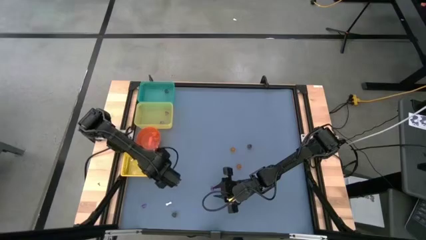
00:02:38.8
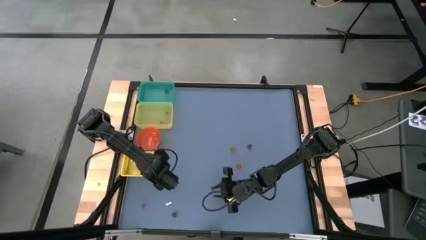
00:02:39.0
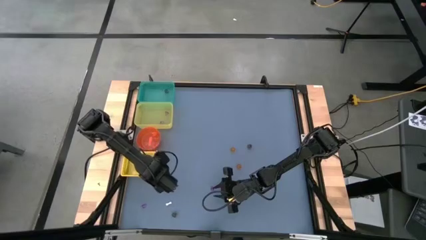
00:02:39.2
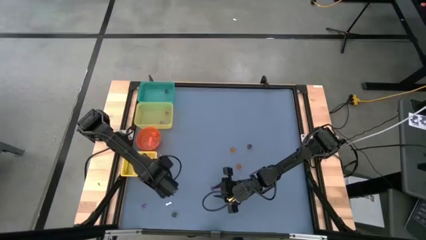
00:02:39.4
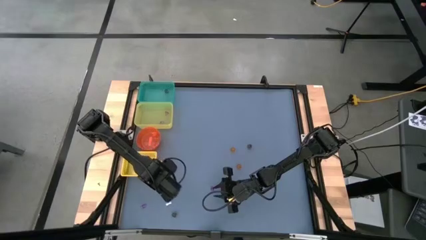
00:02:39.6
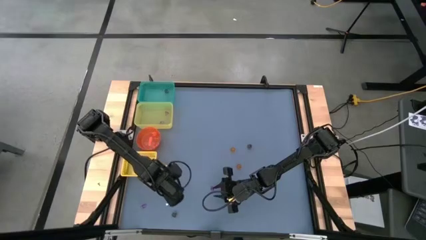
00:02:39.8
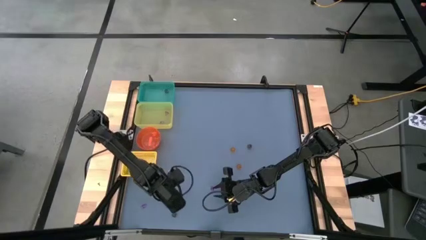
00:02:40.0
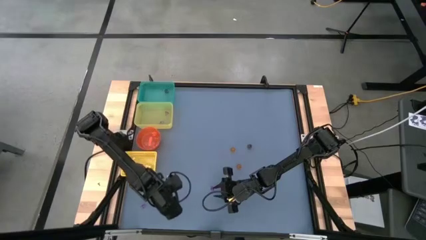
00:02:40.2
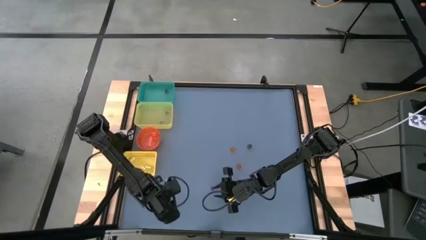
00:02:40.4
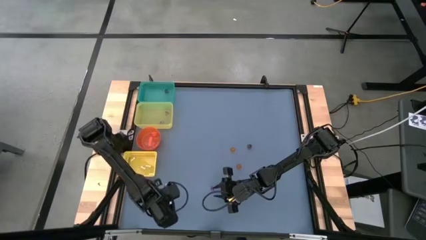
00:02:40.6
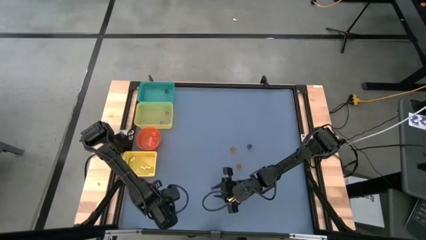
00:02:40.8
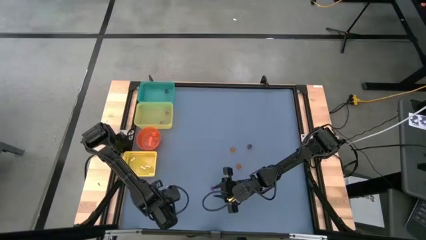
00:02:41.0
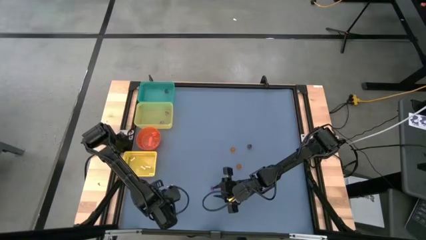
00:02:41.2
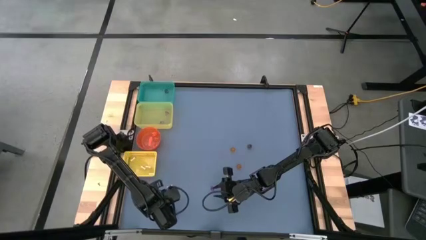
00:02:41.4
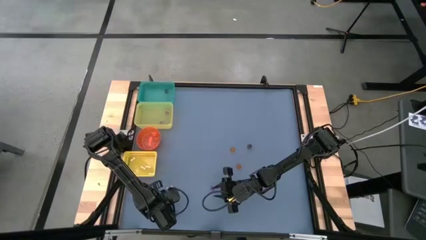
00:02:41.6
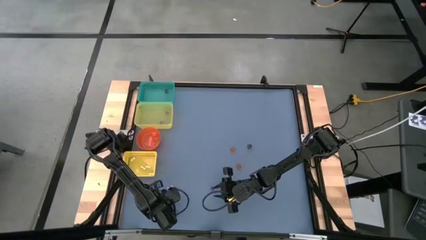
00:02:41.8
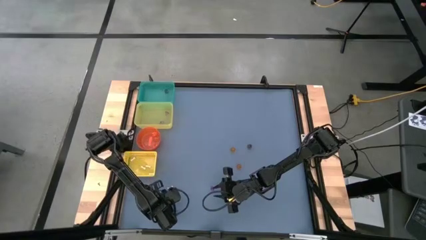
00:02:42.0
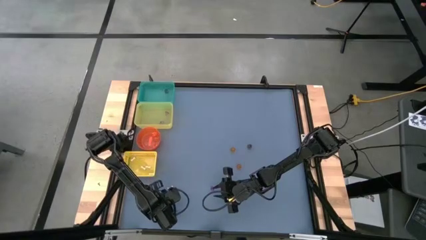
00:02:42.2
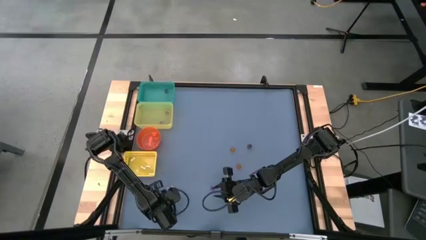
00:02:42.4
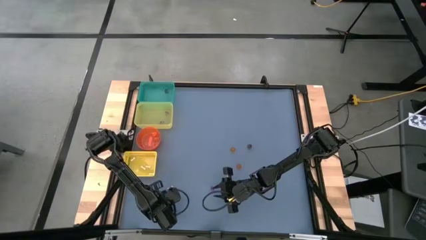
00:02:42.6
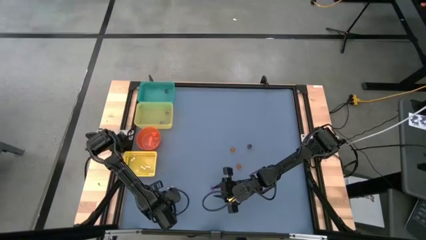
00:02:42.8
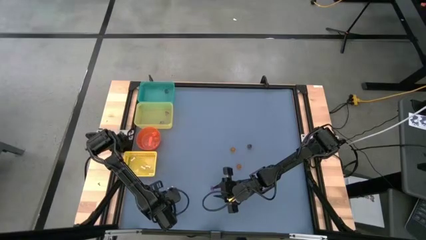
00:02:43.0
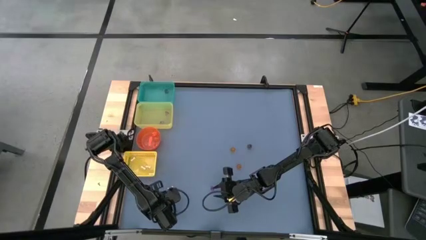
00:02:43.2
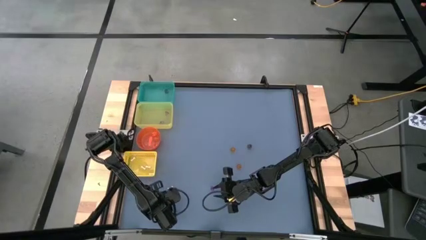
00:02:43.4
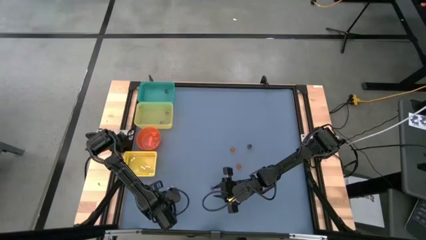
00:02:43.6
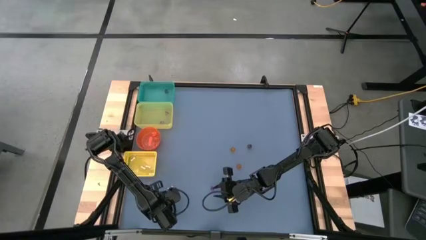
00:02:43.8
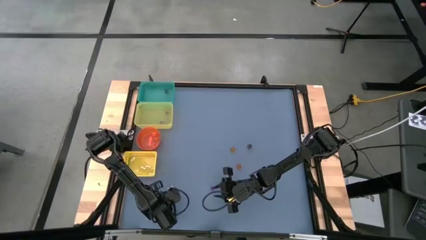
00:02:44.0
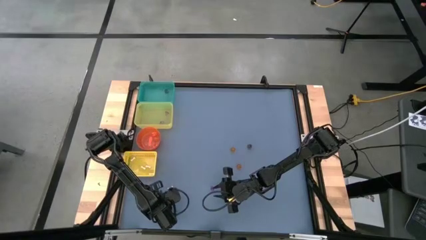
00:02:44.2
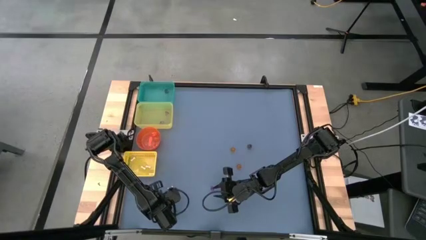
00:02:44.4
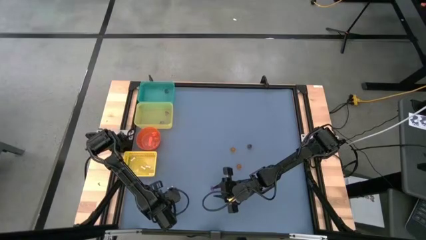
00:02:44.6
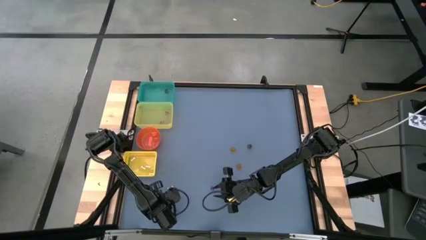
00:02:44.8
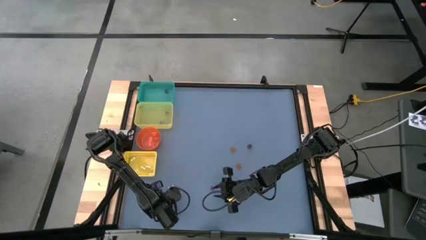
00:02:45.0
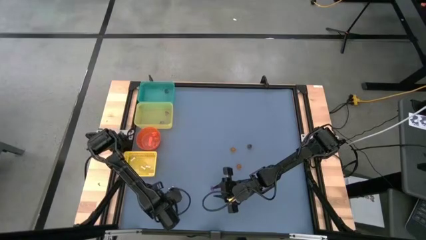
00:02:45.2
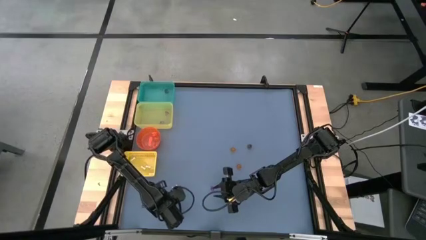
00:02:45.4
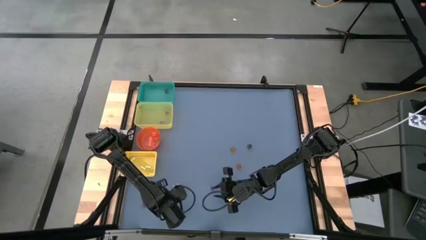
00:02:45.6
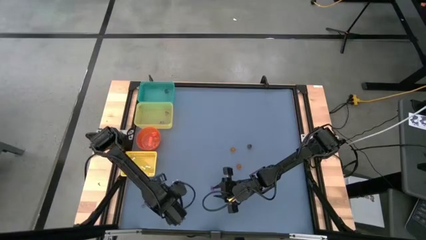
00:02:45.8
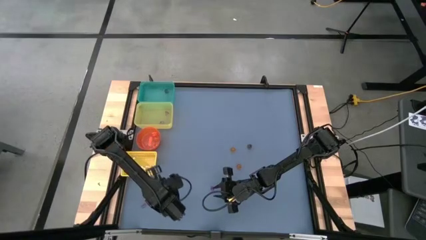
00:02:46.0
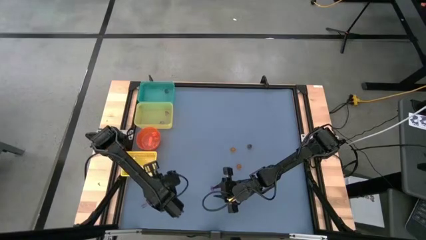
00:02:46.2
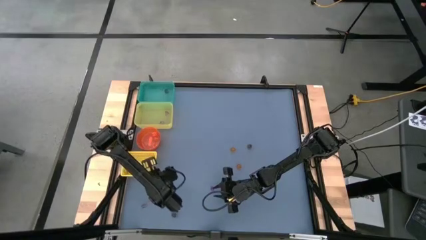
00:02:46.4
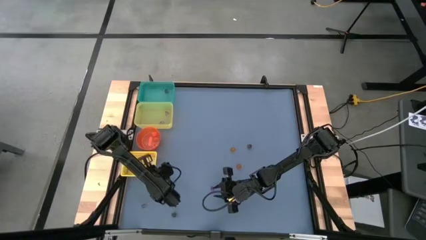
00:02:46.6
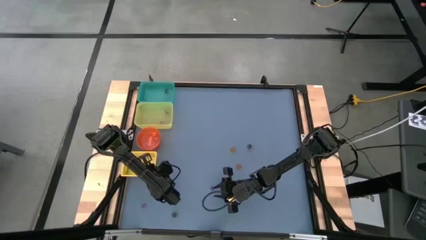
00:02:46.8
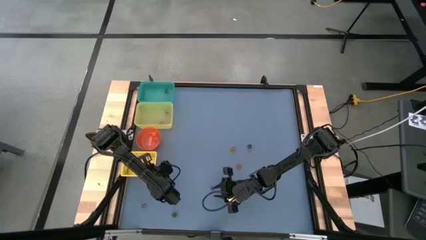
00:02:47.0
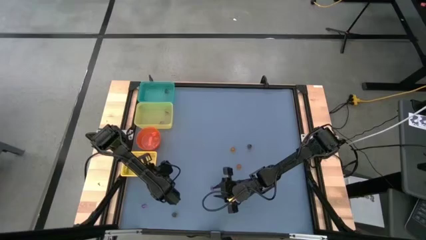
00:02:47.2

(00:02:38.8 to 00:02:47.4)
Task: Sort Halloween decoration
Put the white bone toy into the yellow basket

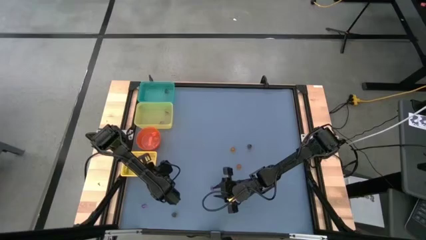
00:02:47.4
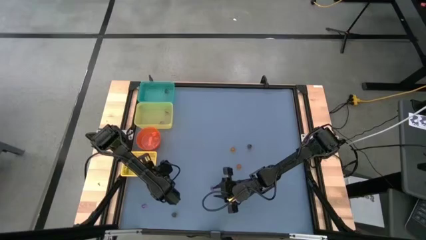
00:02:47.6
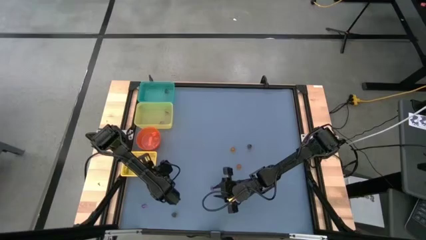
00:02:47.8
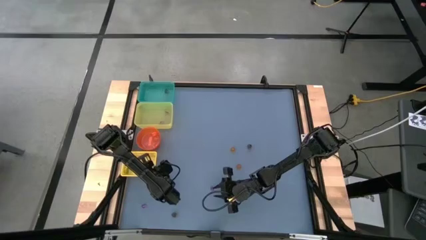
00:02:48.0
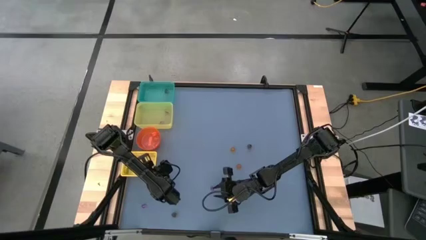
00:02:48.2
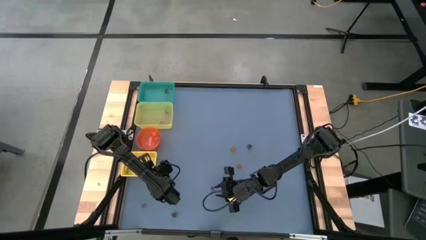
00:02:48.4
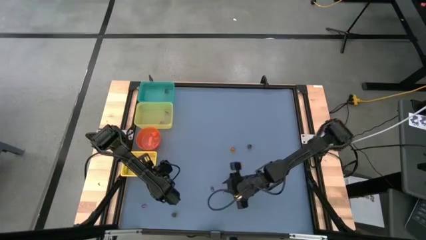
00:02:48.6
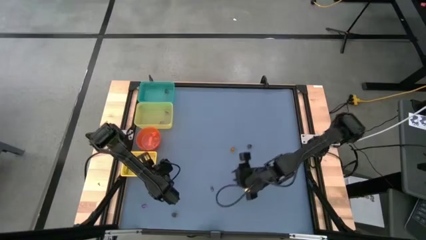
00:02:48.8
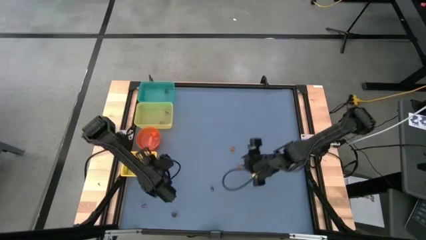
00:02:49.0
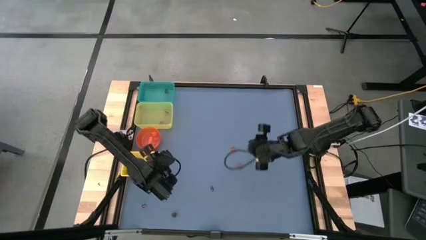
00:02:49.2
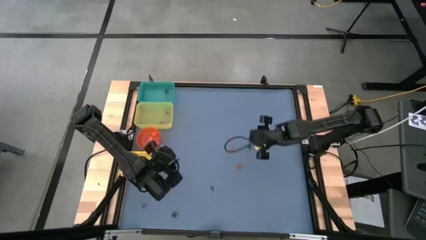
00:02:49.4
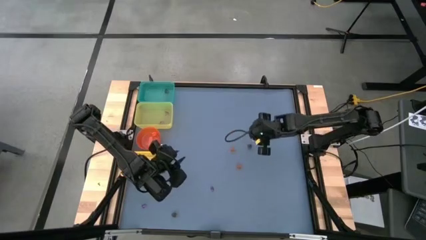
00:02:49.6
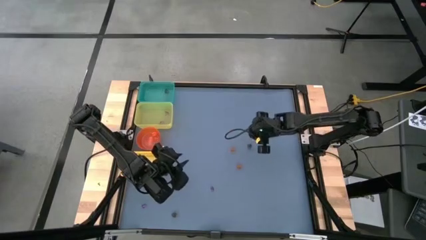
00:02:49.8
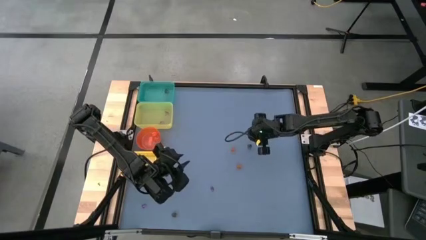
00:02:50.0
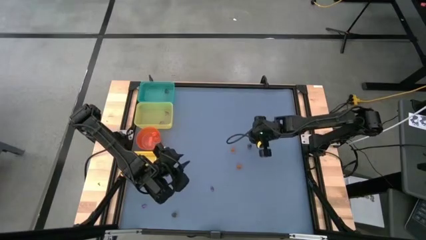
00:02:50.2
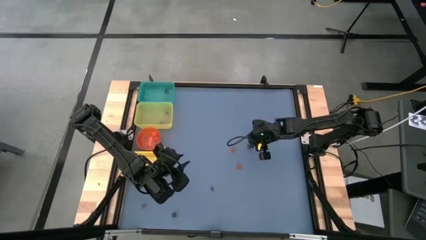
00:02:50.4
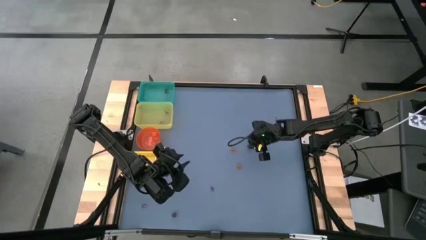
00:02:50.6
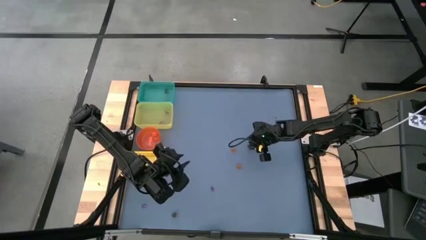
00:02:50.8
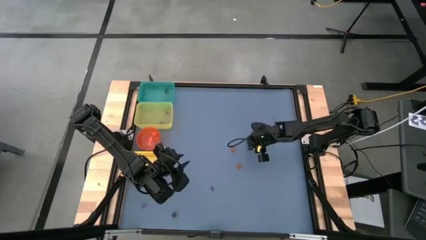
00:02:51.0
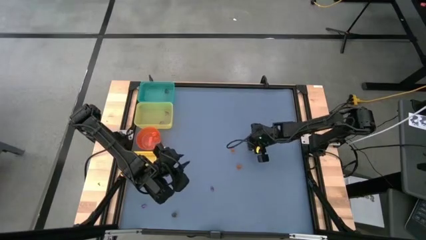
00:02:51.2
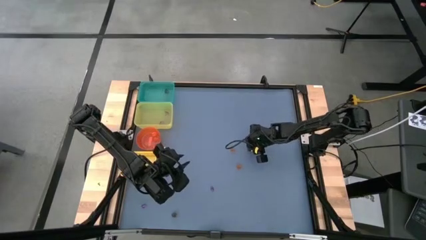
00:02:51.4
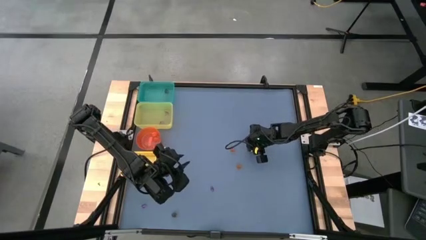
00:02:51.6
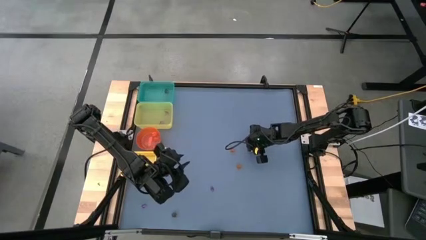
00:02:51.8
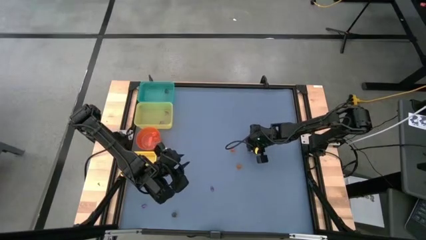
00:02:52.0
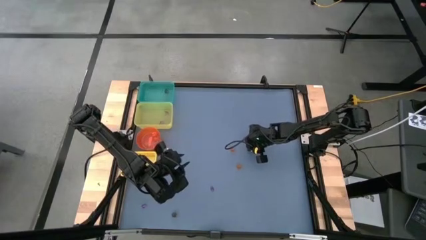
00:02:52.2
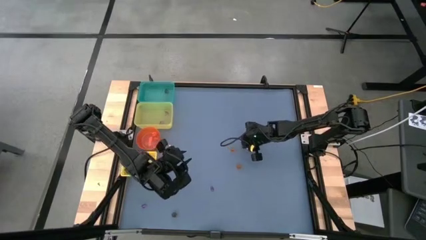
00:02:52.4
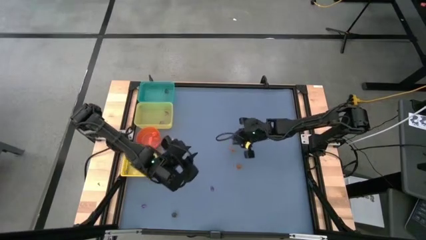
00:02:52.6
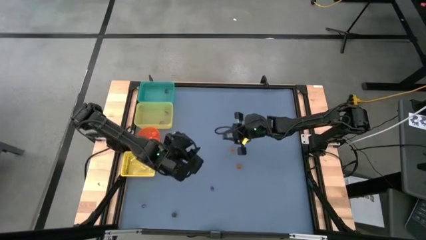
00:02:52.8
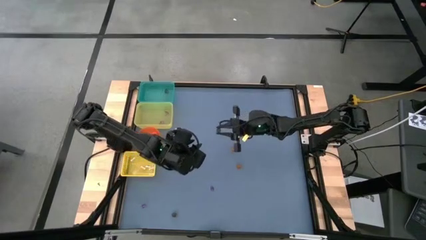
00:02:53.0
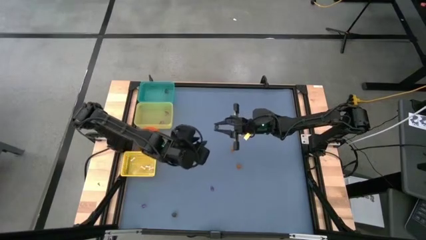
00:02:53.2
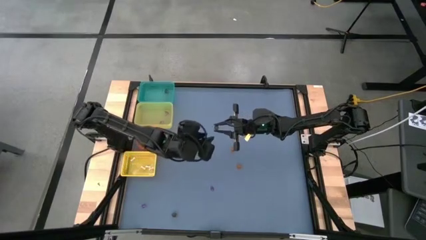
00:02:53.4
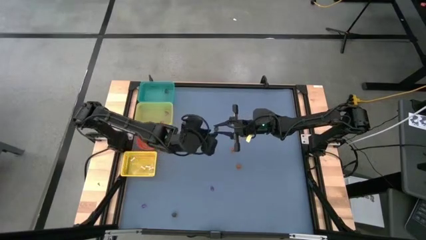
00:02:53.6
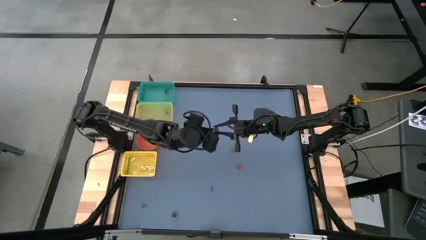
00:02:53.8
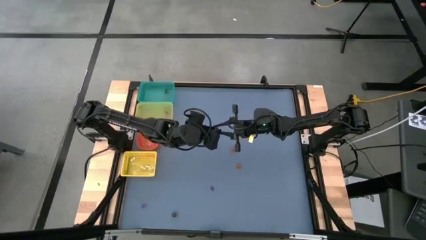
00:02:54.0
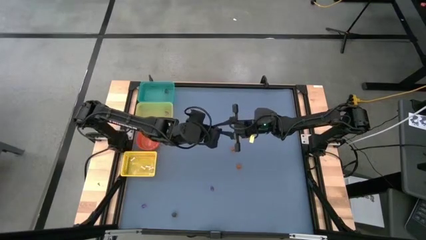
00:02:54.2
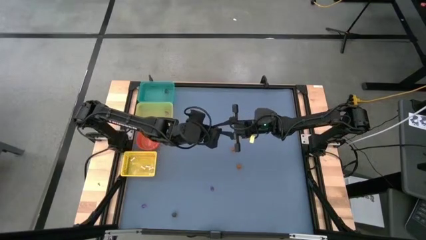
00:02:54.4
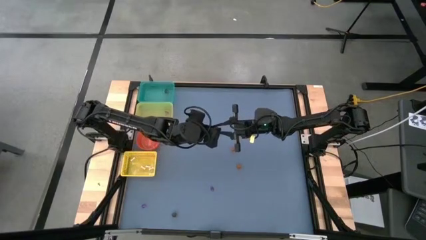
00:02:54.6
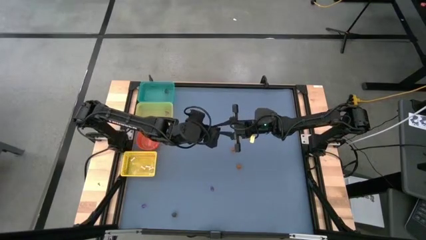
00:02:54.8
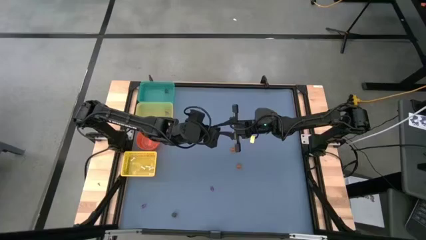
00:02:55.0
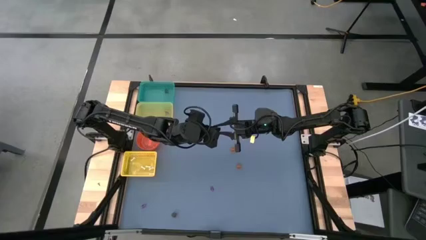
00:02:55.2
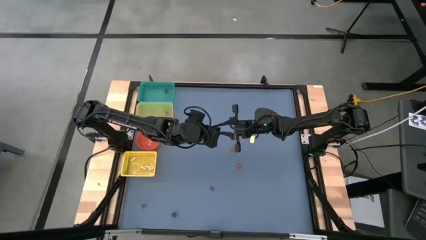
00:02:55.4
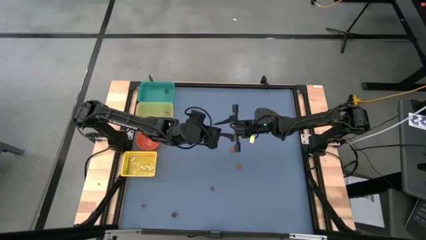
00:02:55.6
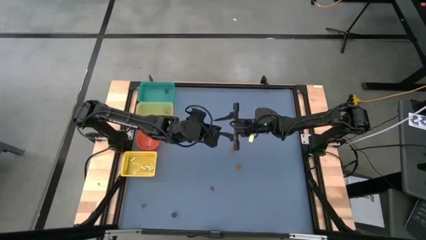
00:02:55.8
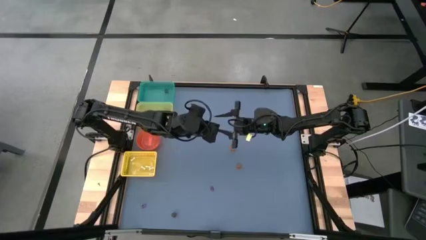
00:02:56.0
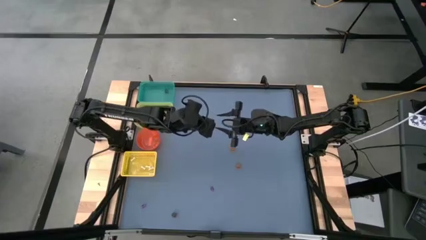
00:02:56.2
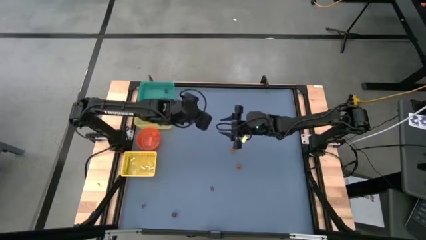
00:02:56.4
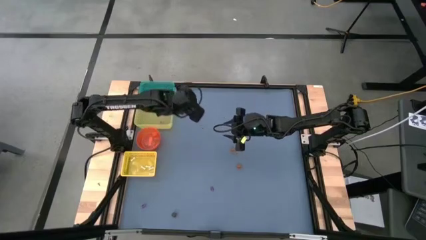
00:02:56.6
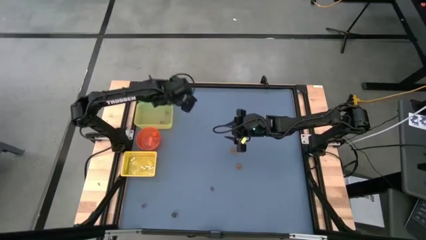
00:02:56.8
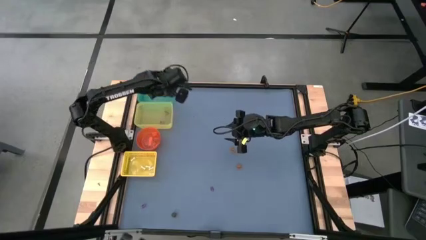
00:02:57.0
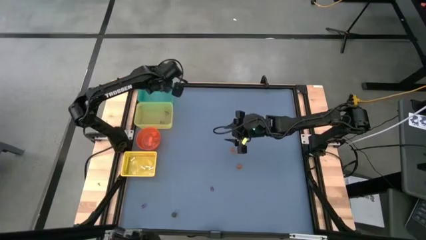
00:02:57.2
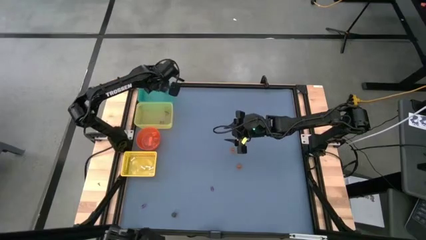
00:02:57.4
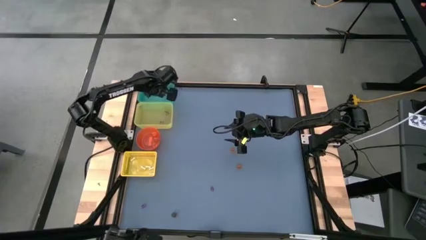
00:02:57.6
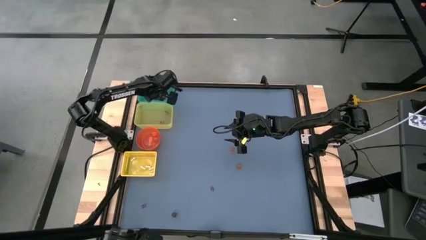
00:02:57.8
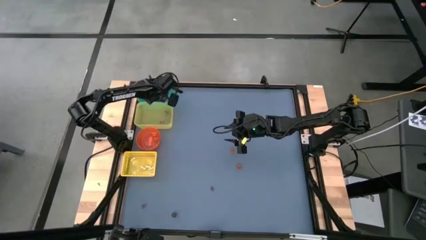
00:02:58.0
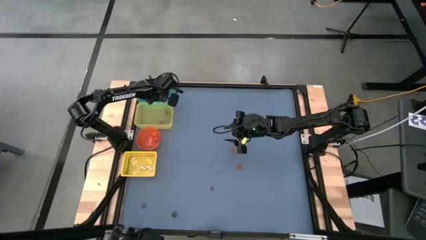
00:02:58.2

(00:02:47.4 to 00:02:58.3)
Put the top black skull toy into the green bin
